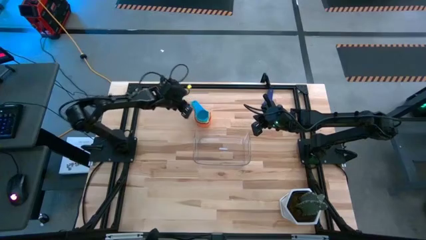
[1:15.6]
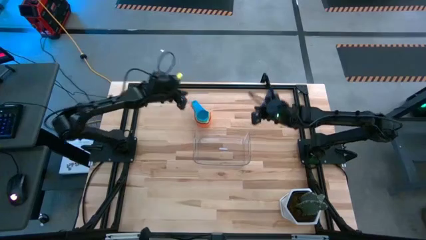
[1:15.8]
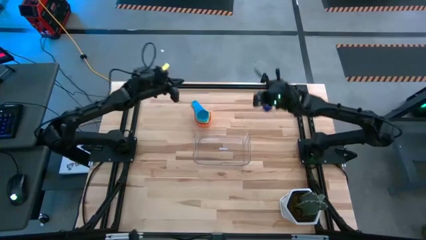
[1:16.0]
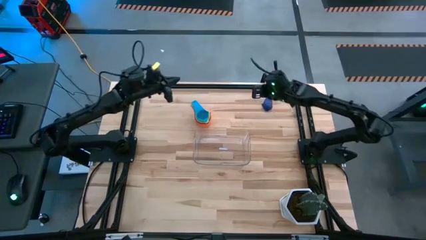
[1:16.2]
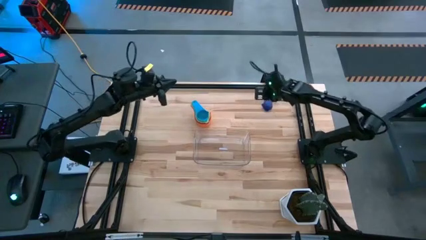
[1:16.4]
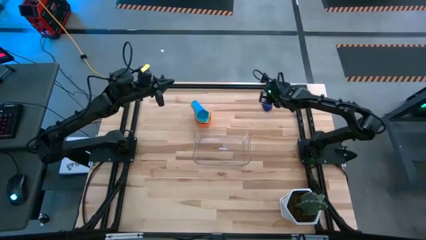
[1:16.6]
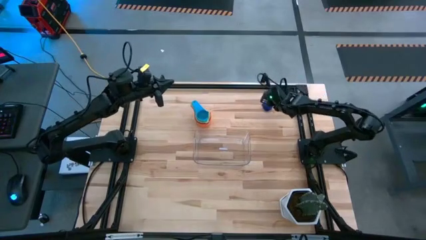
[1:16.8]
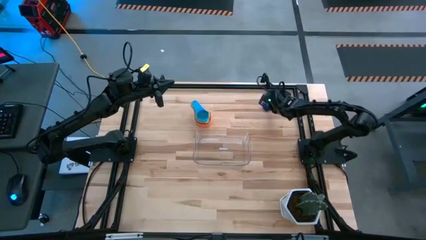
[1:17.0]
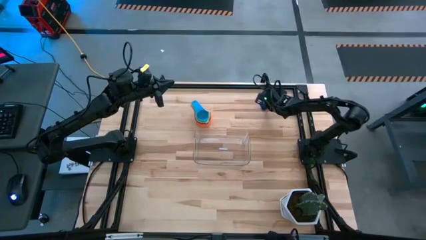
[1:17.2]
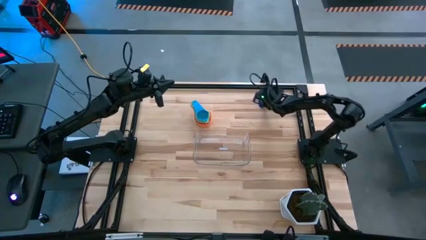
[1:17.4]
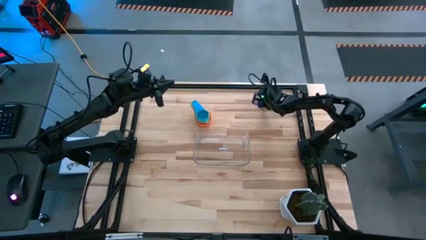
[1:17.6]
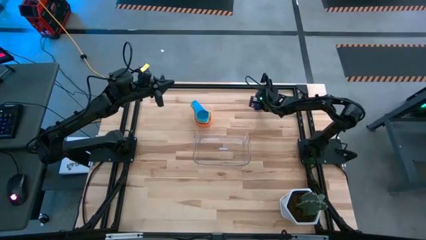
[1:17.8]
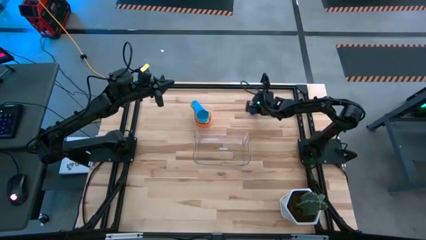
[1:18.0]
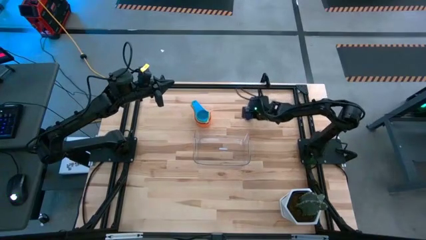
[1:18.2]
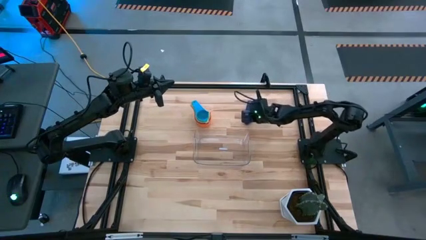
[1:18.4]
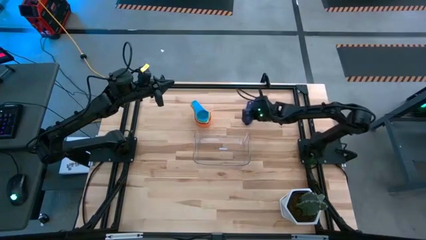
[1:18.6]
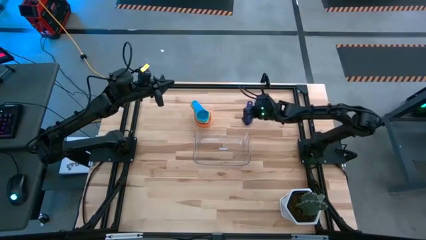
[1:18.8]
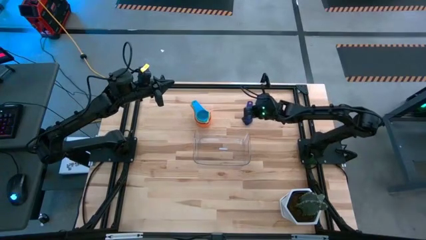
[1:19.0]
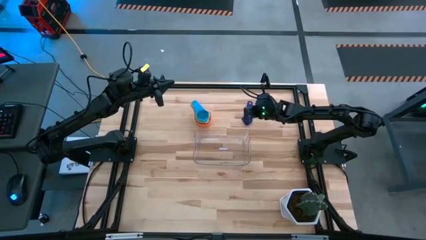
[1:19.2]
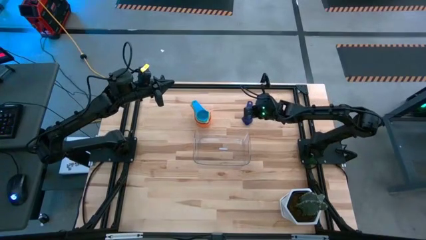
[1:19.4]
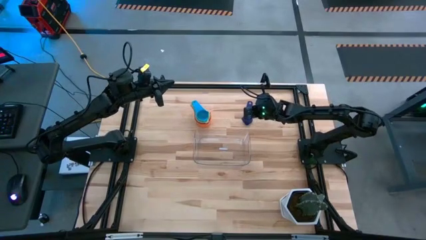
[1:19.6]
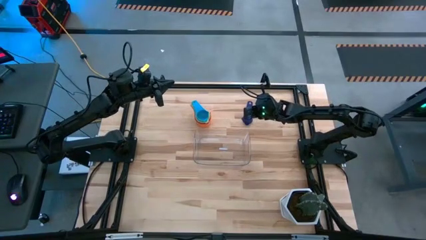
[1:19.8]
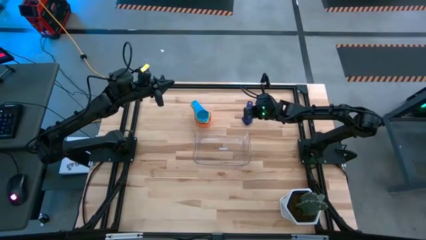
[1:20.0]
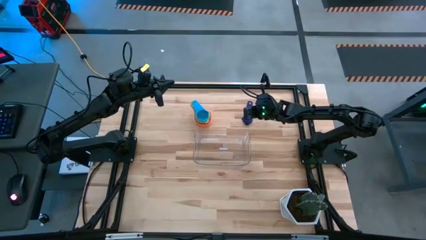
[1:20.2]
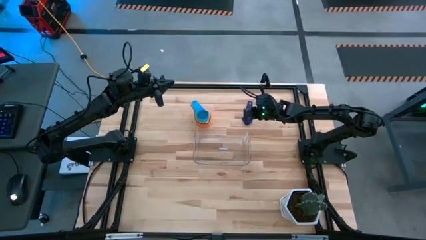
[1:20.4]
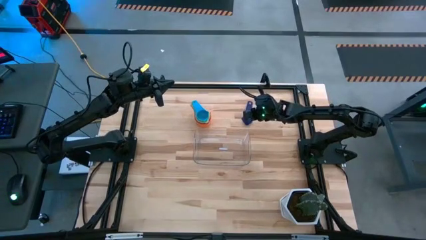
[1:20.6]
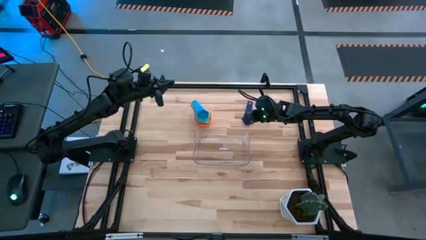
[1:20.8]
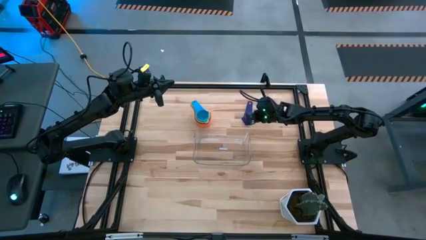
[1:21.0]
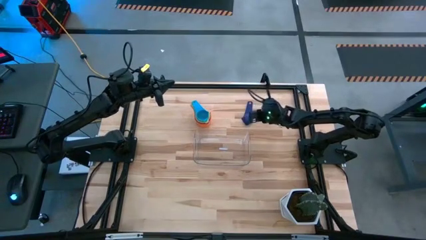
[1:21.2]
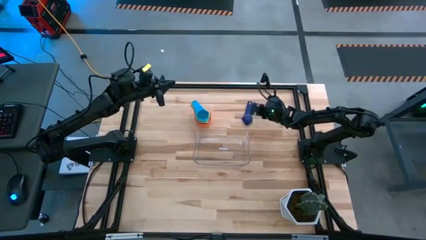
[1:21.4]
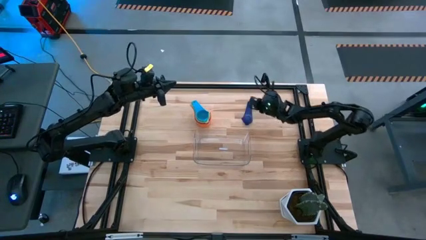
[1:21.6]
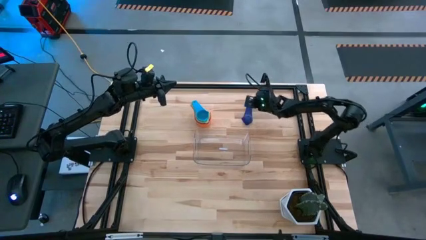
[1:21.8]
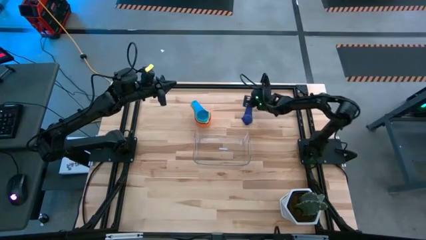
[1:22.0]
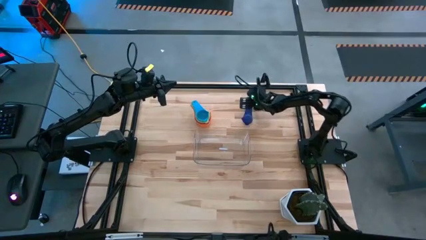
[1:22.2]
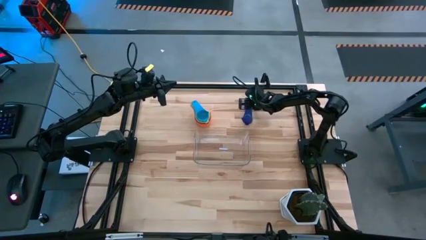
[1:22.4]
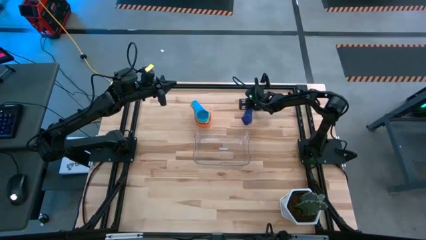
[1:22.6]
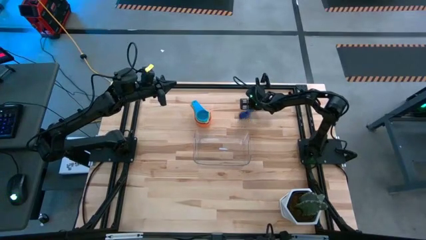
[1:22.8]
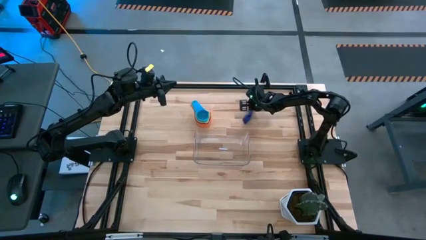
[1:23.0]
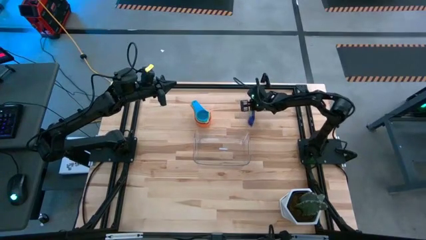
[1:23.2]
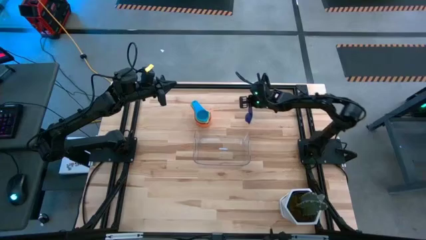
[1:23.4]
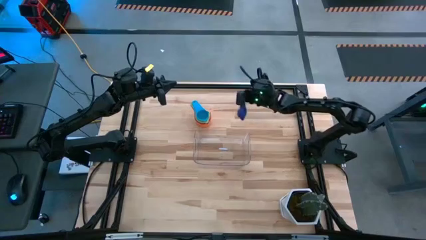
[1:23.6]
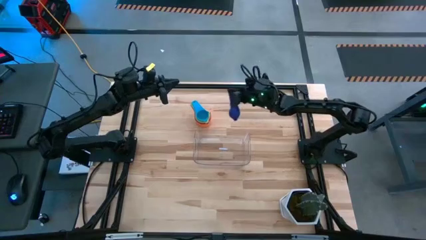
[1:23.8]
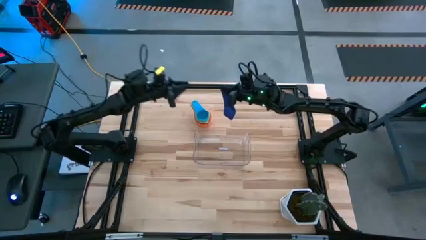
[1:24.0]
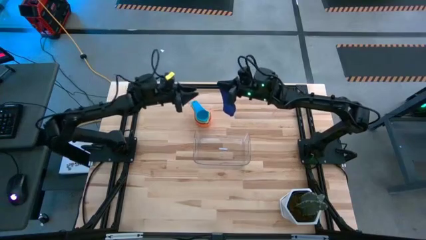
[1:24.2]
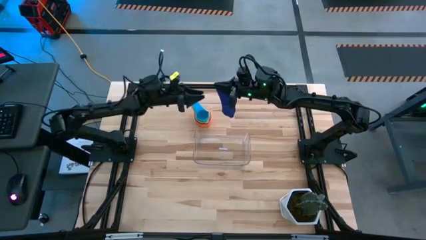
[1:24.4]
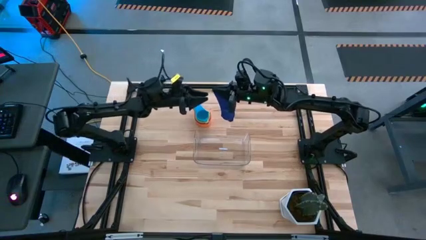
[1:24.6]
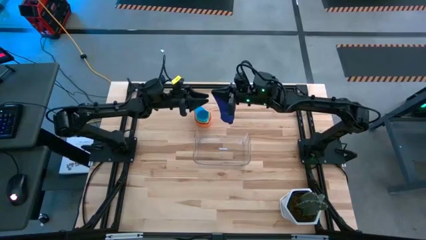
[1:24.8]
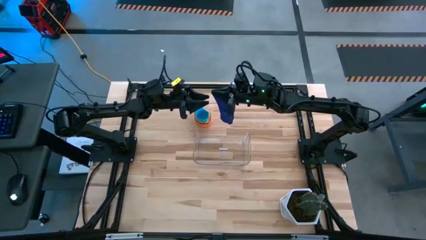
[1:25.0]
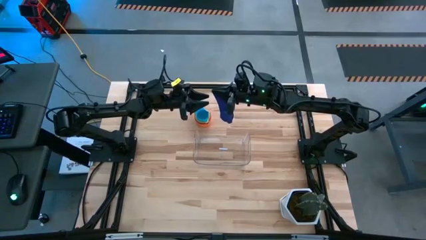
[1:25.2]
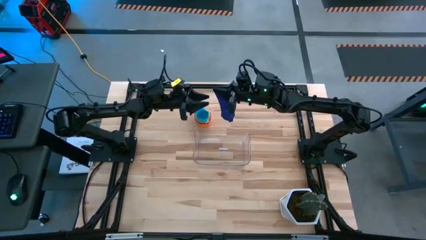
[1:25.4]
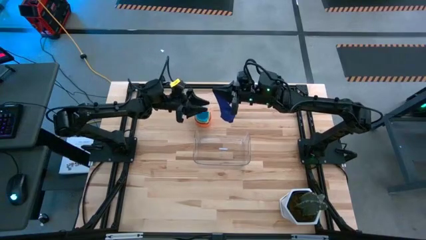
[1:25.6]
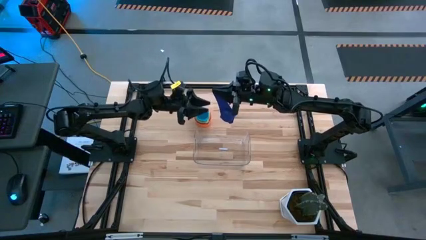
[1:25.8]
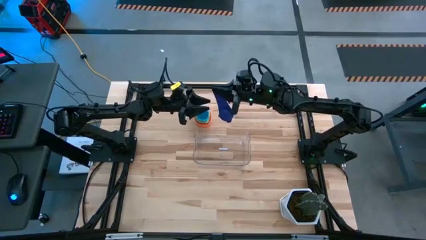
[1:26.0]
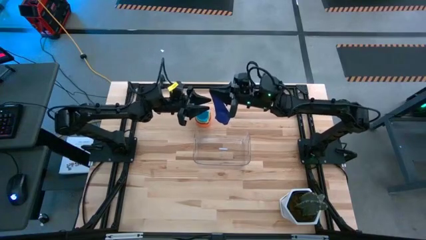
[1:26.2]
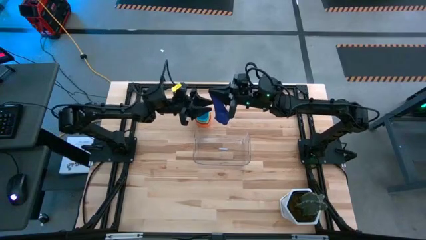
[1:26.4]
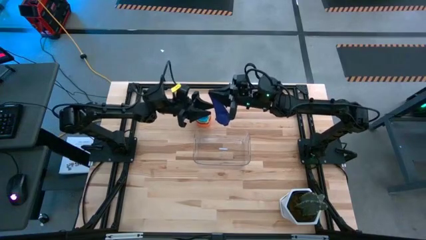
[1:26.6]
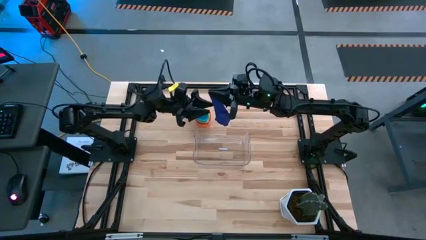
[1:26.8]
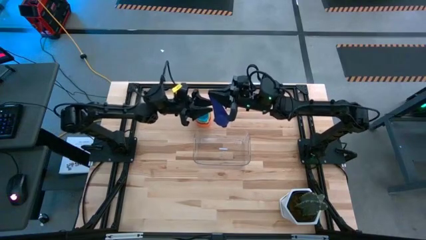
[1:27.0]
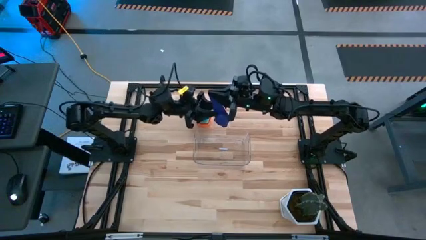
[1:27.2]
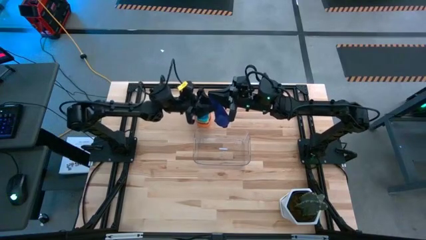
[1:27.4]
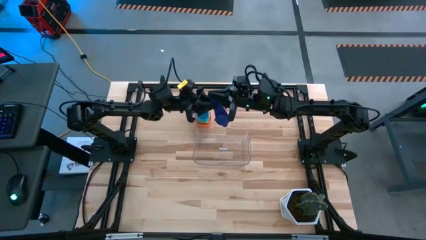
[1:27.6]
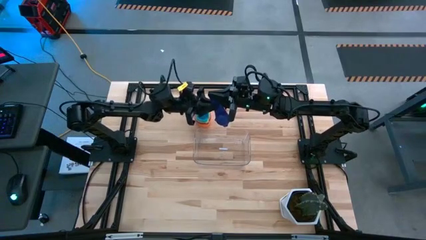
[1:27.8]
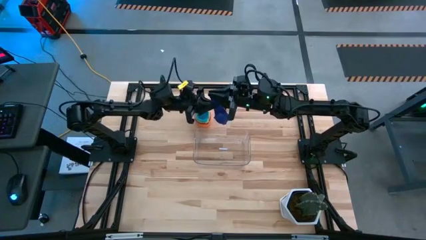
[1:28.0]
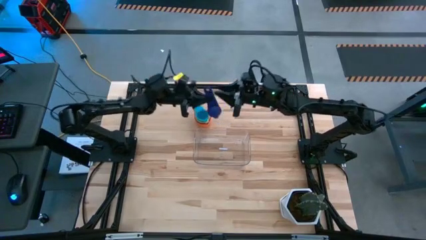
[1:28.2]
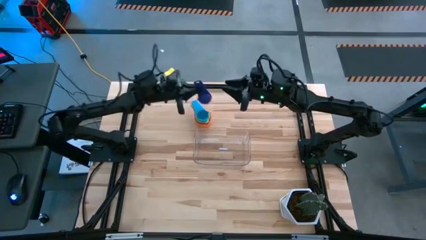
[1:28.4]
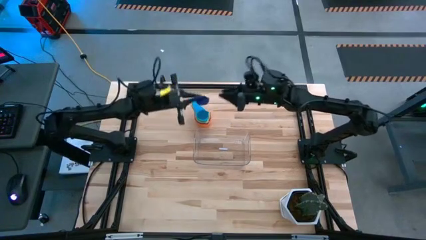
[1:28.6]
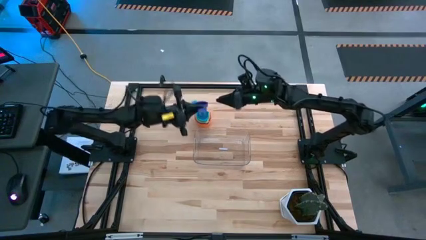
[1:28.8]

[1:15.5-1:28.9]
Task: Nest measuring cups in basket
Stack the violet measuring cup on top of the light blue measuring cup

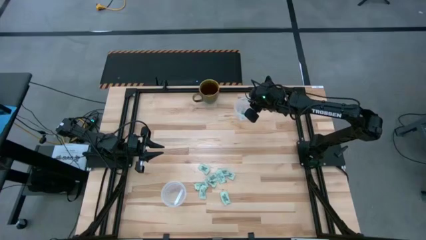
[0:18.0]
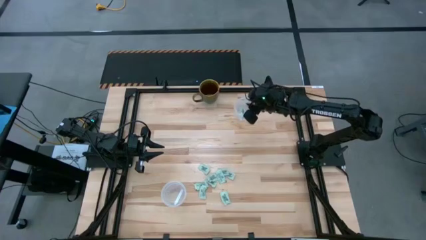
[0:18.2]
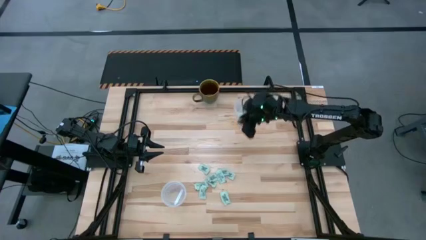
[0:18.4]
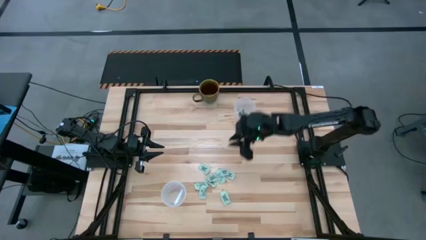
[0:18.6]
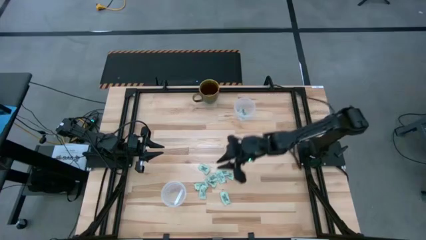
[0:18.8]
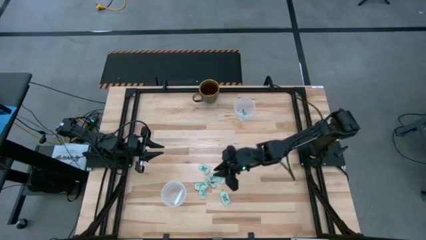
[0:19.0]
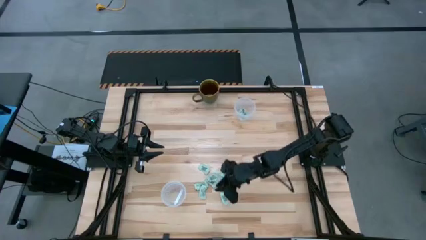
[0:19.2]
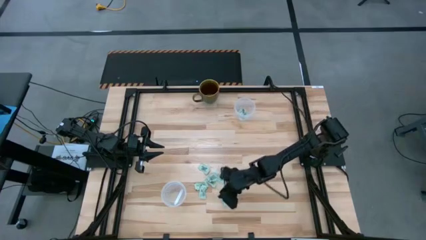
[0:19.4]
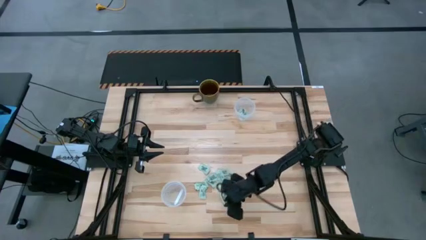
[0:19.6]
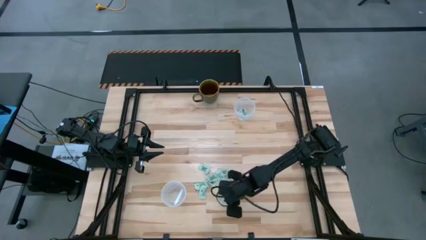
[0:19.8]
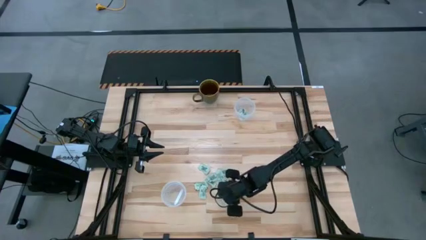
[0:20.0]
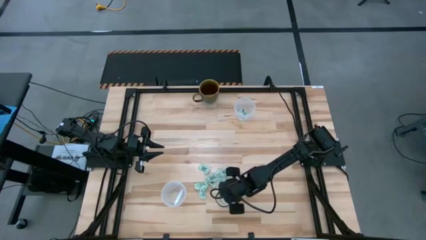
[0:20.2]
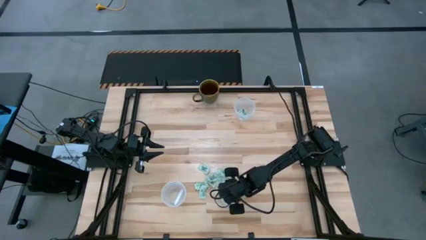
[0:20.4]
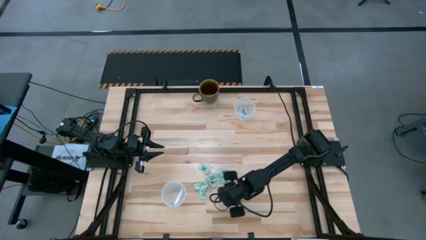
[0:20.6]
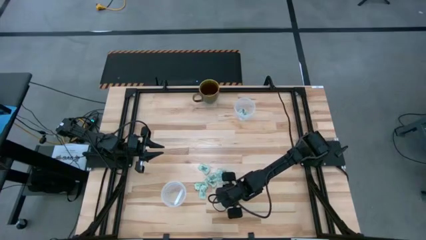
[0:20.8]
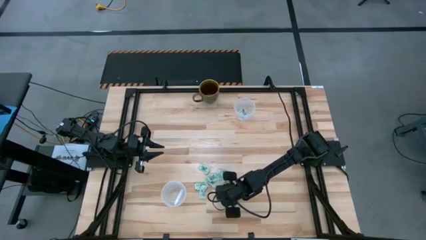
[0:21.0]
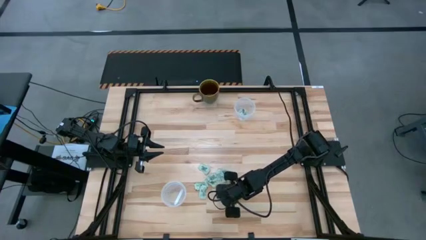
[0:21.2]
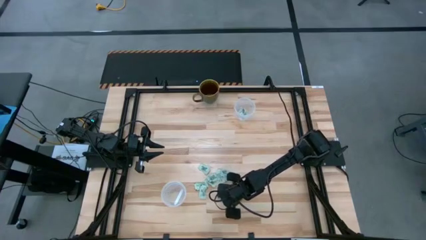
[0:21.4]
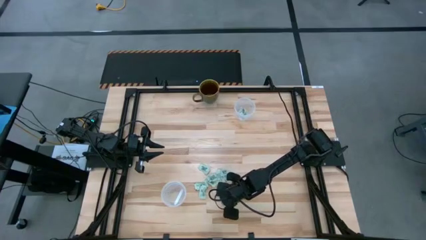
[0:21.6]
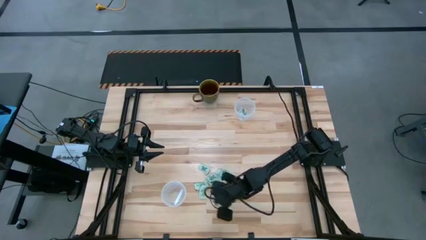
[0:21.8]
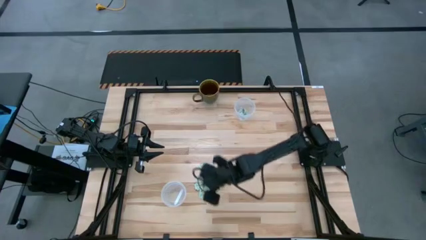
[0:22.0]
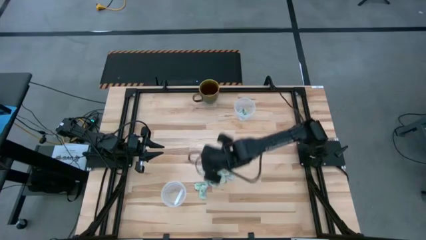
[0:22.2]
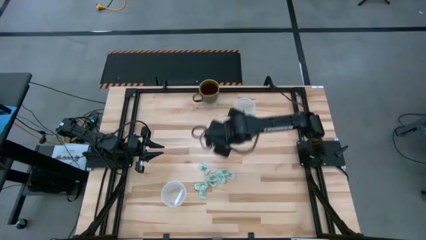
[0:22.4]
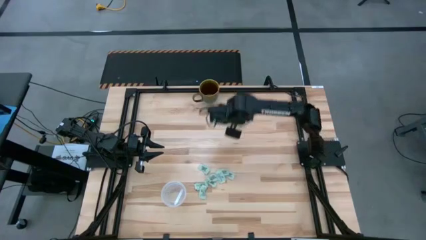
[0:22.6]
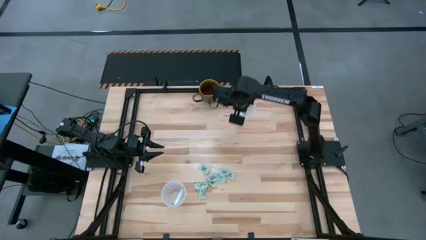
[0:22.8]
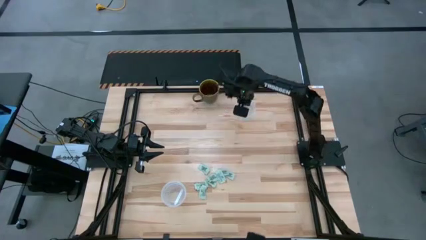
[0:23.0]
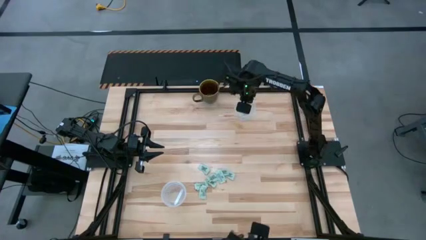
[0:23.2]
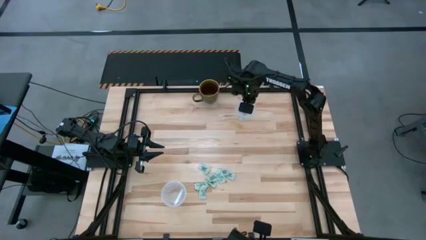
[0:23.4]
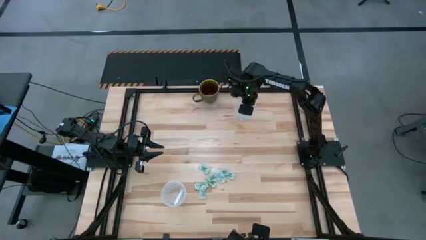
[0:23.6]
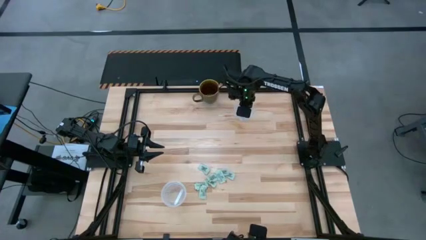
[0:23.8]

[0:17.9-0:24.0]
Task: Pick and place items into bin
Put the stevia packet into the top transparent bin
